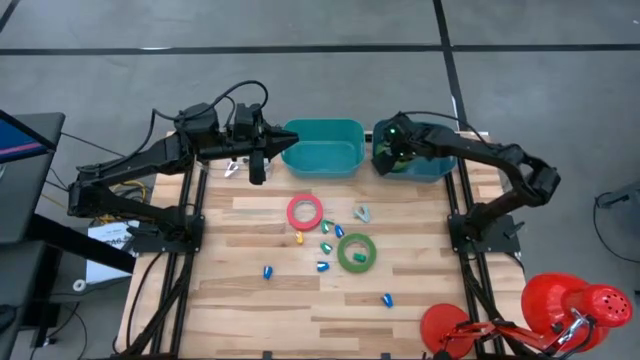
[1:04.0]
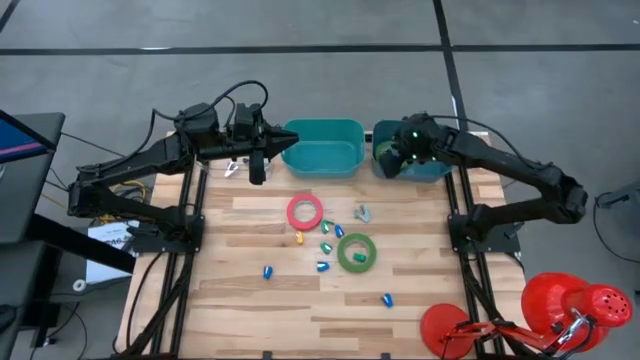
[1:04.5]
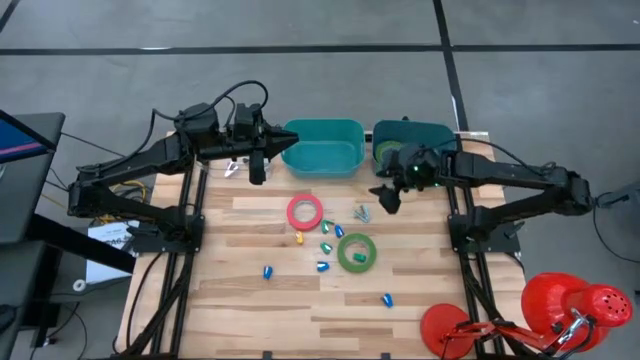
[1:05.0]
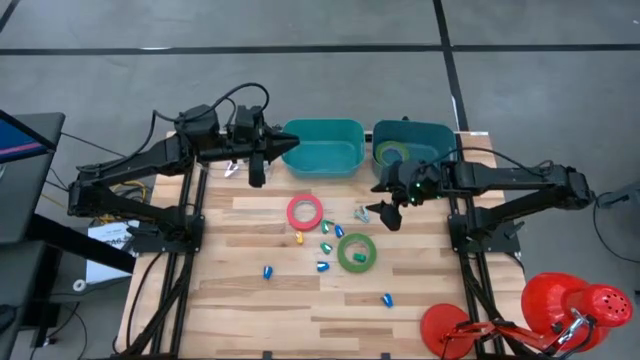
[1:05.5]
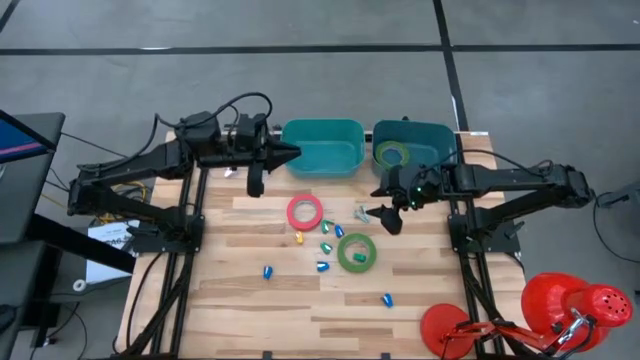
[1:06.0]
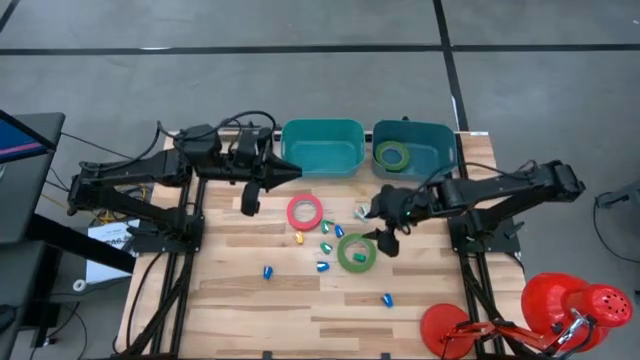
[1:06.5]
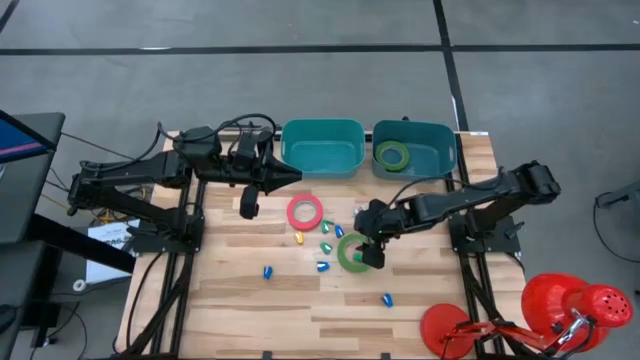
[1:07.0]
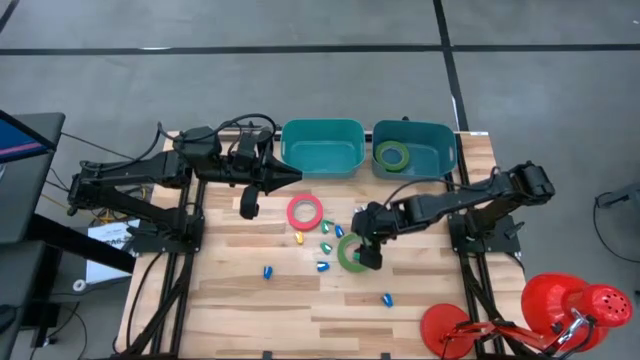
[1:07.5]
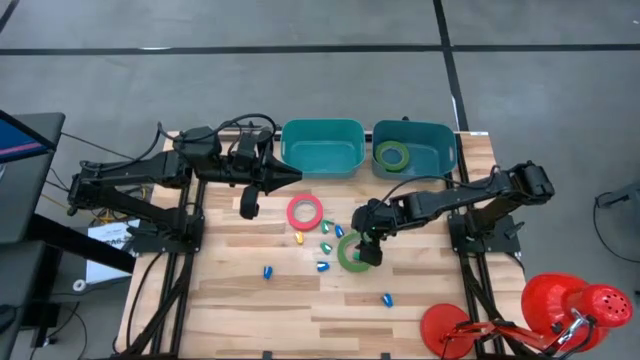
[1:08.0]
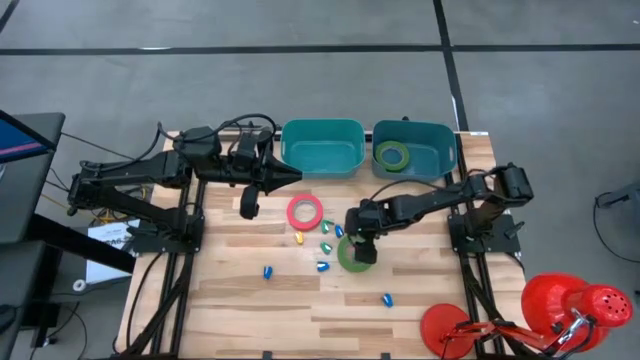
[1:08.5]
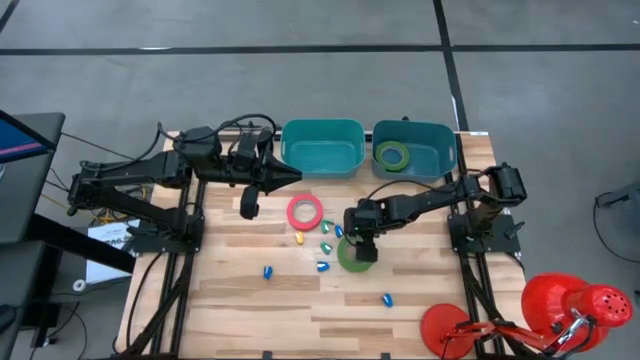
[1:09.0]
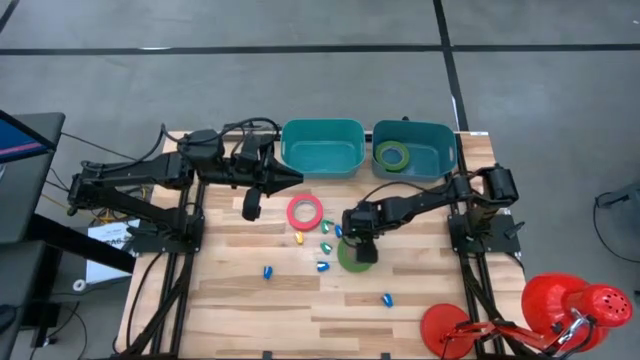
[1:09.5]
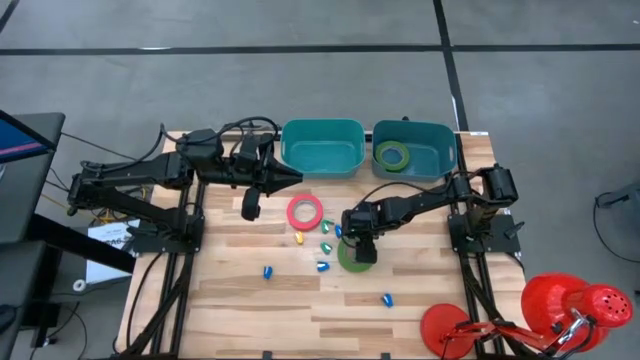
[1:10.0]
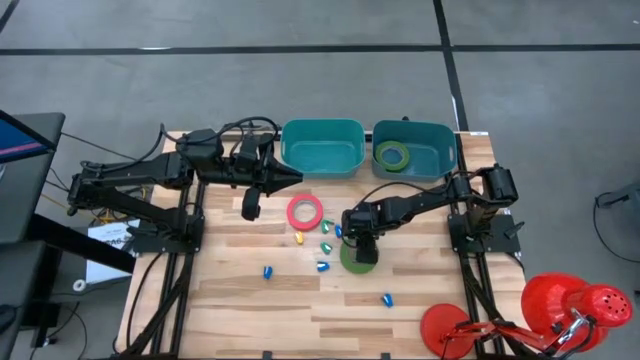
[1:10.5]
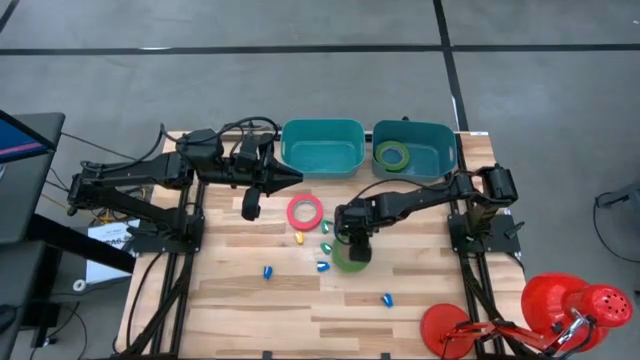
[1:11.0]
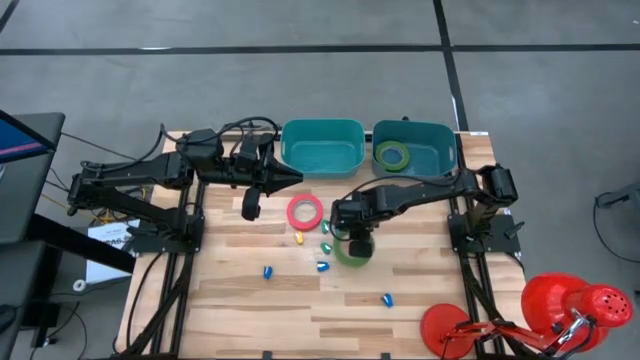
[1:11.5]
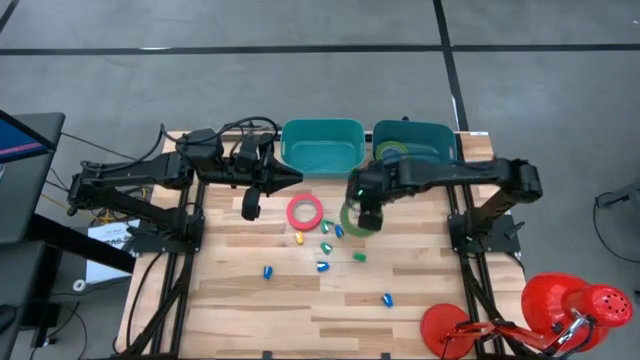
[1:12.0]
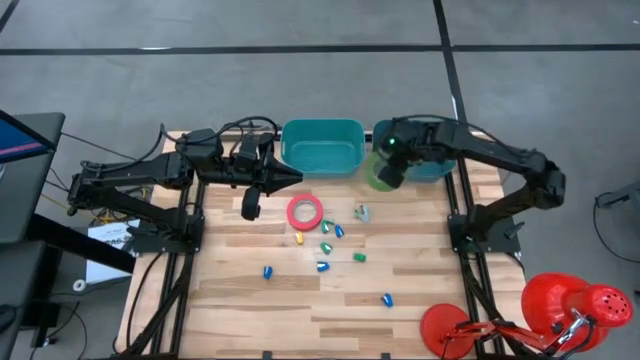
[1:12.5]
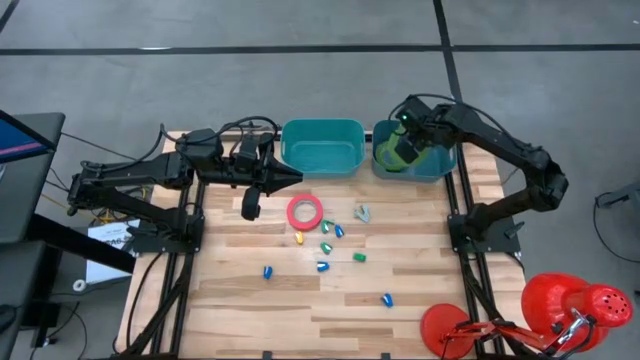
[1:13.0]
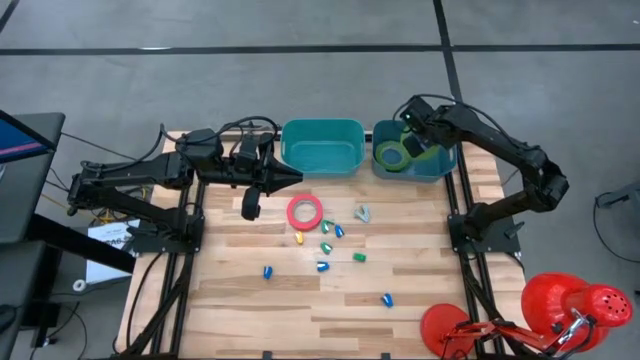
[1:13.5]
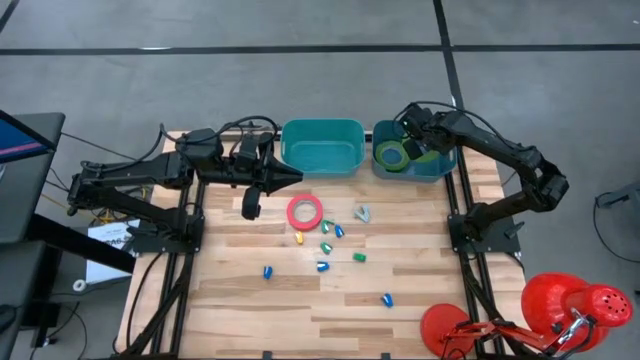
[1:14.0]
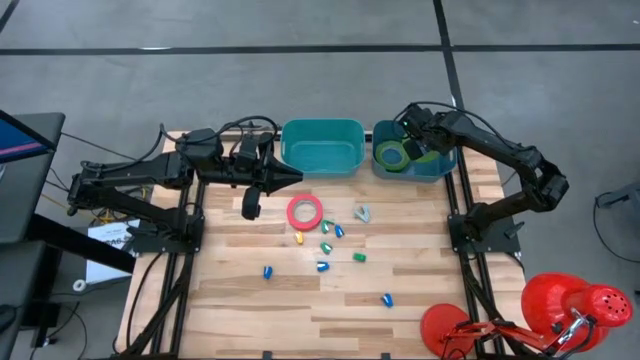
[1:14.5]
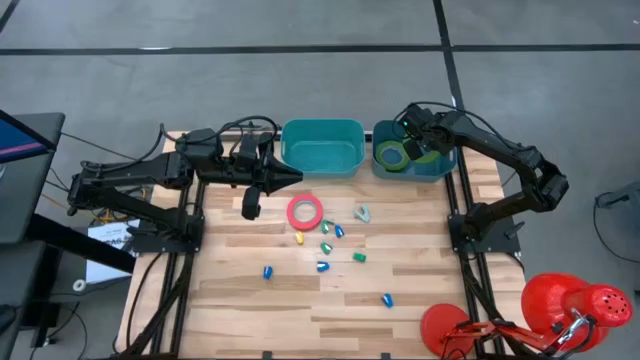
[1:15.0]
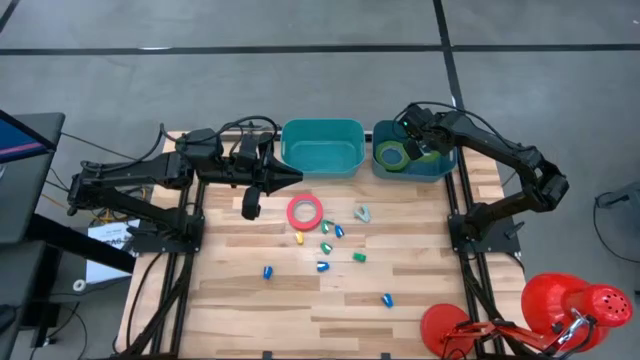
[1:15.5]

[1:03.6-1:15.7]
Task: Pick and place Stapler, Stapler remover, tape
Put the green tape into the blue bin
